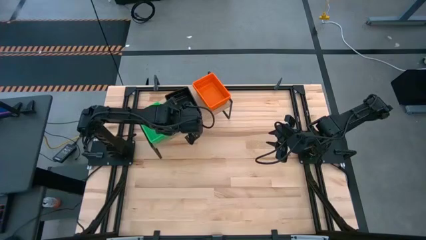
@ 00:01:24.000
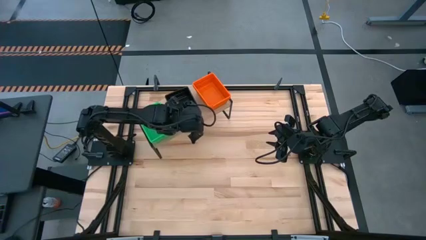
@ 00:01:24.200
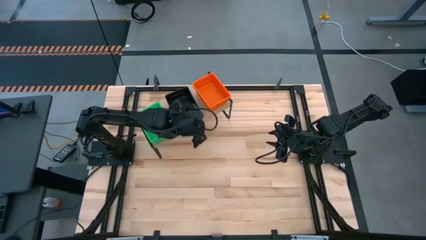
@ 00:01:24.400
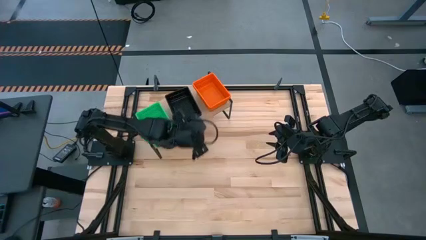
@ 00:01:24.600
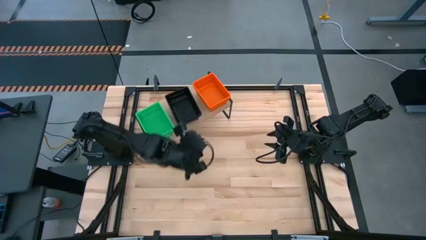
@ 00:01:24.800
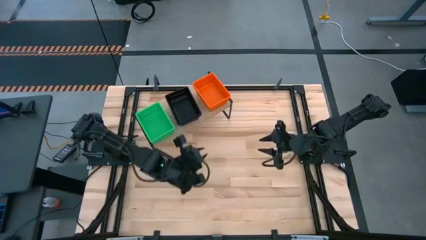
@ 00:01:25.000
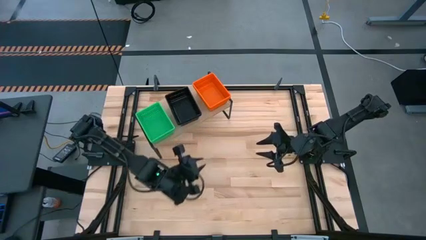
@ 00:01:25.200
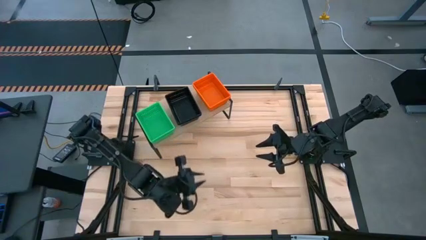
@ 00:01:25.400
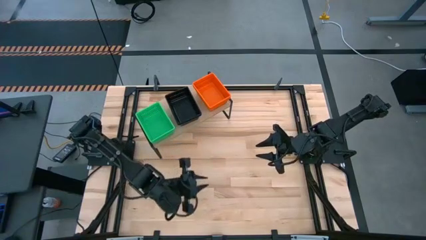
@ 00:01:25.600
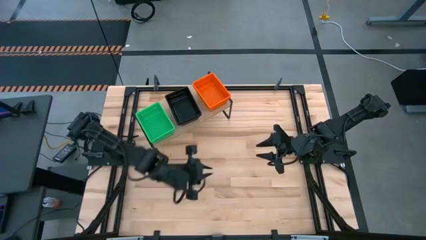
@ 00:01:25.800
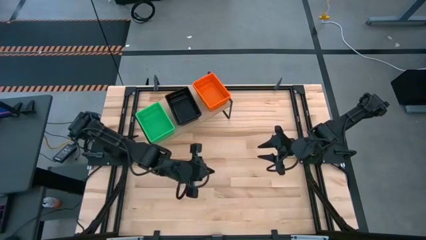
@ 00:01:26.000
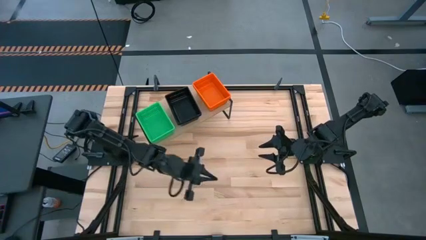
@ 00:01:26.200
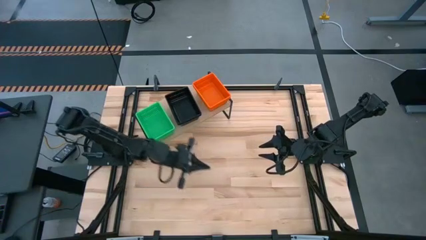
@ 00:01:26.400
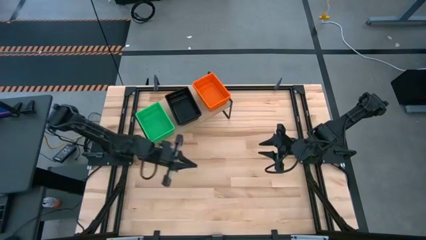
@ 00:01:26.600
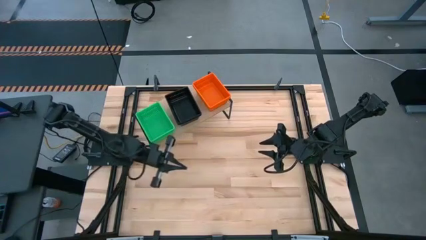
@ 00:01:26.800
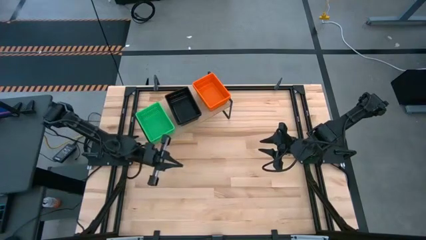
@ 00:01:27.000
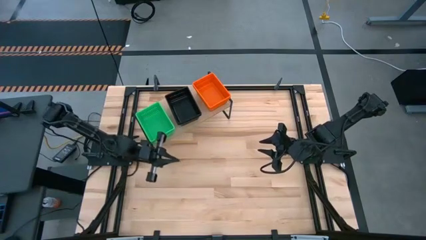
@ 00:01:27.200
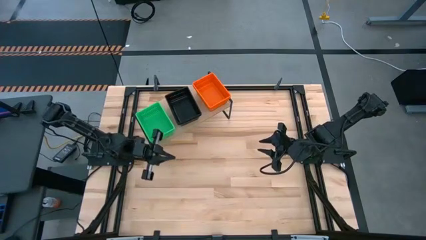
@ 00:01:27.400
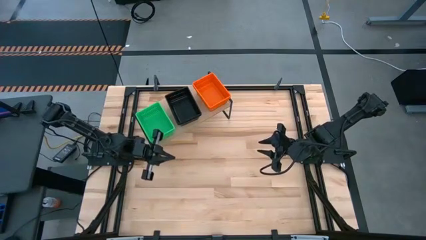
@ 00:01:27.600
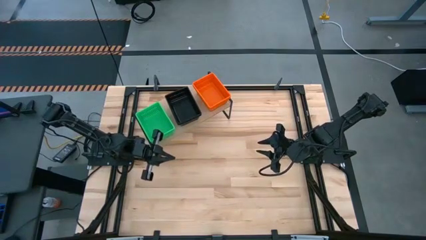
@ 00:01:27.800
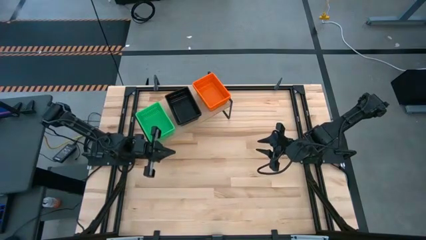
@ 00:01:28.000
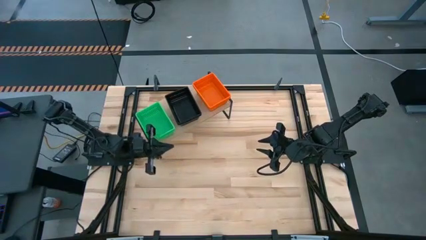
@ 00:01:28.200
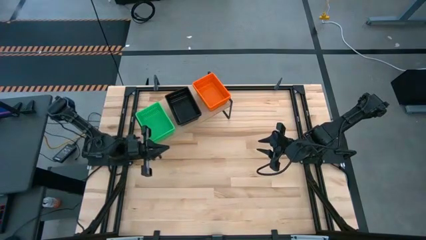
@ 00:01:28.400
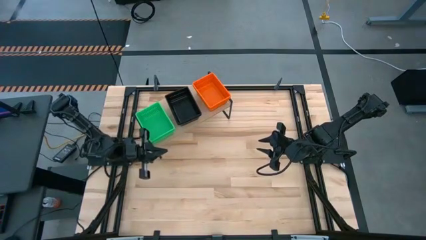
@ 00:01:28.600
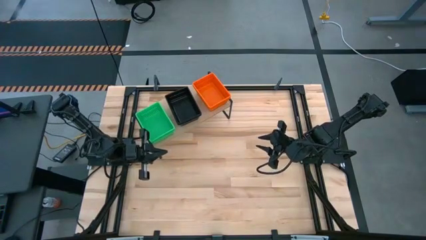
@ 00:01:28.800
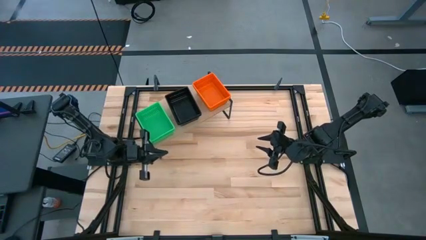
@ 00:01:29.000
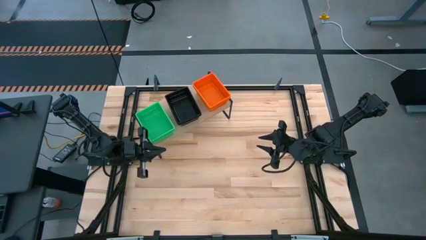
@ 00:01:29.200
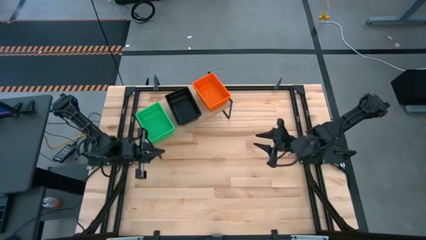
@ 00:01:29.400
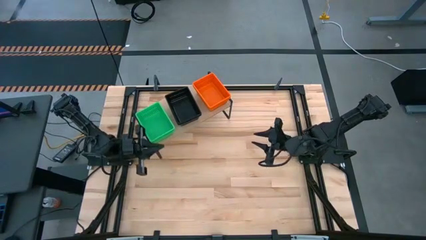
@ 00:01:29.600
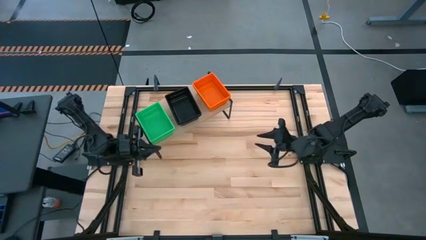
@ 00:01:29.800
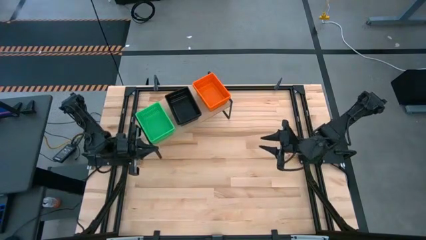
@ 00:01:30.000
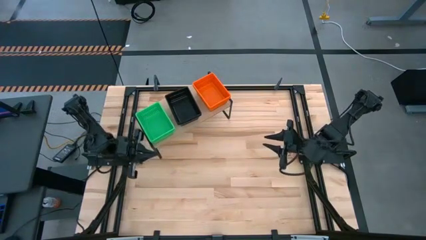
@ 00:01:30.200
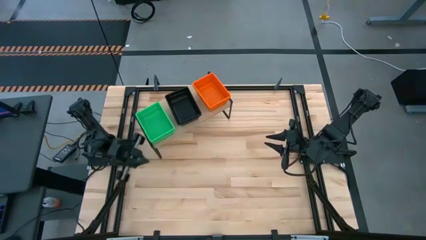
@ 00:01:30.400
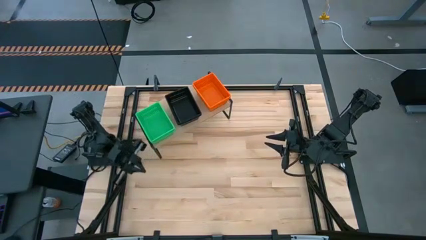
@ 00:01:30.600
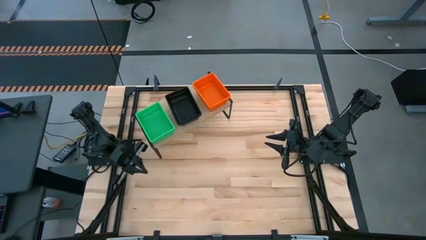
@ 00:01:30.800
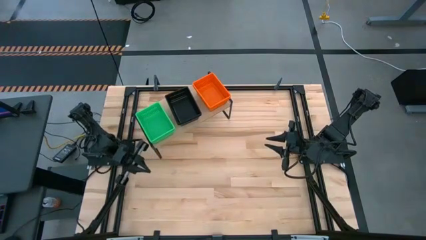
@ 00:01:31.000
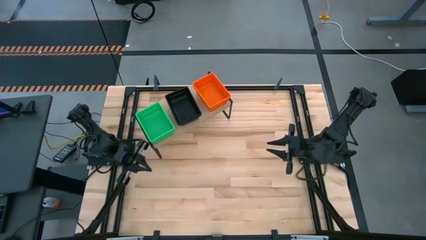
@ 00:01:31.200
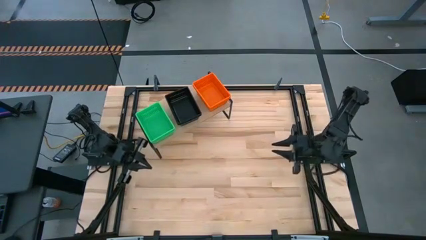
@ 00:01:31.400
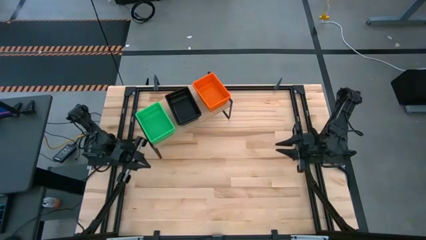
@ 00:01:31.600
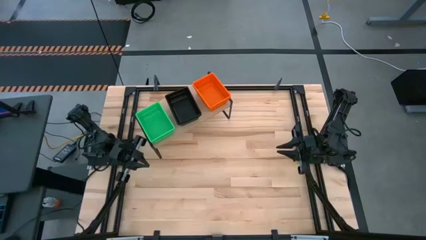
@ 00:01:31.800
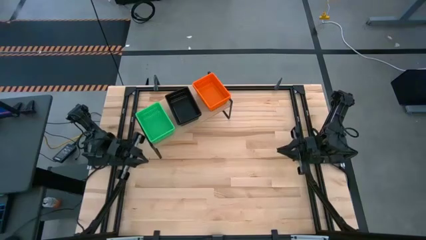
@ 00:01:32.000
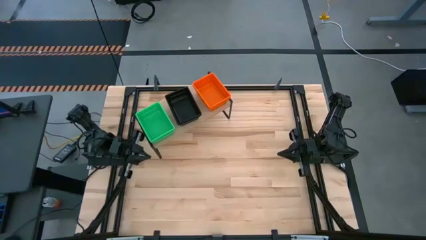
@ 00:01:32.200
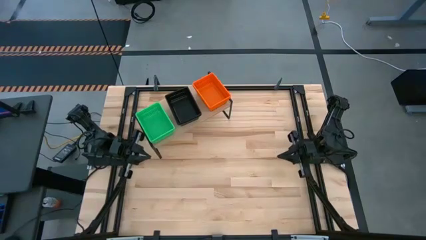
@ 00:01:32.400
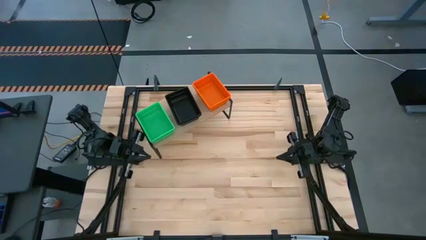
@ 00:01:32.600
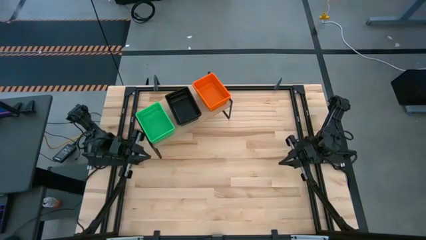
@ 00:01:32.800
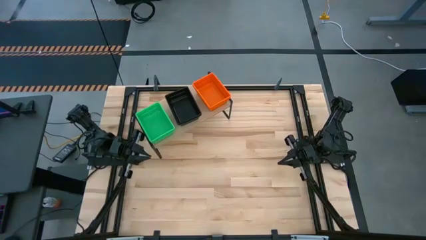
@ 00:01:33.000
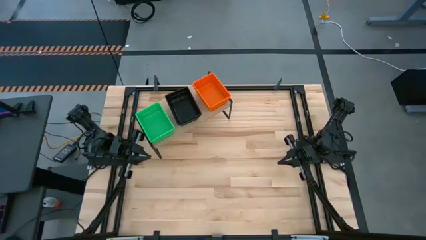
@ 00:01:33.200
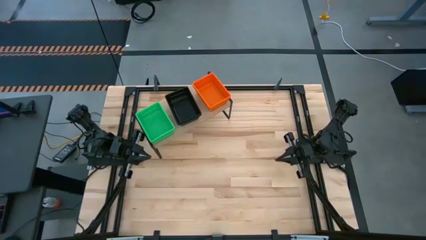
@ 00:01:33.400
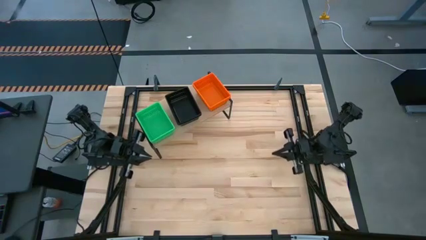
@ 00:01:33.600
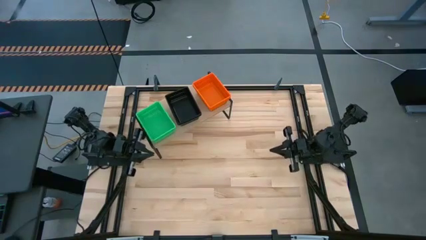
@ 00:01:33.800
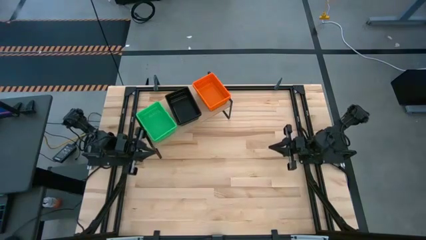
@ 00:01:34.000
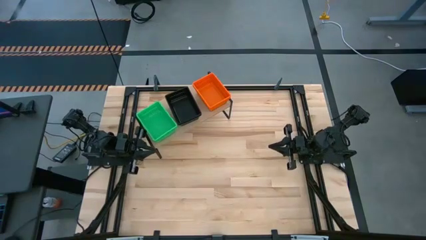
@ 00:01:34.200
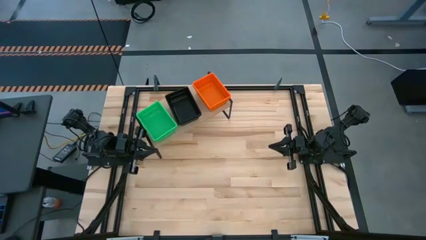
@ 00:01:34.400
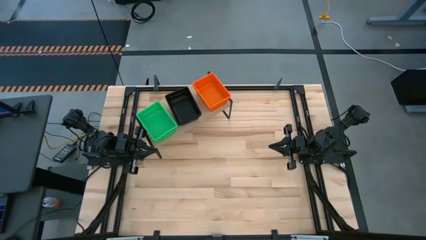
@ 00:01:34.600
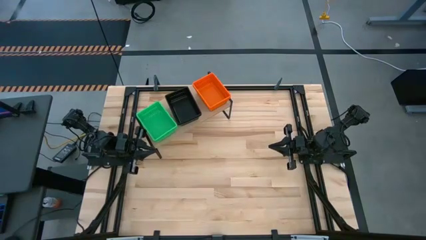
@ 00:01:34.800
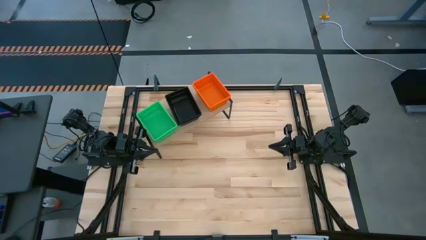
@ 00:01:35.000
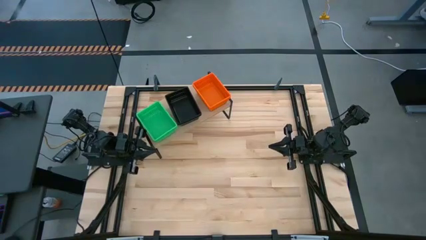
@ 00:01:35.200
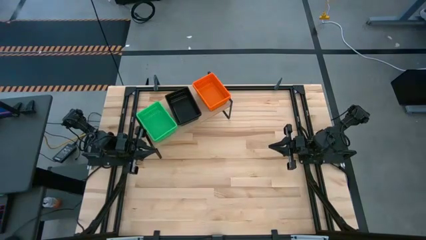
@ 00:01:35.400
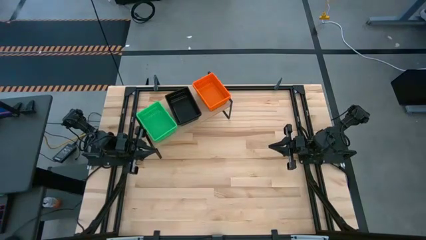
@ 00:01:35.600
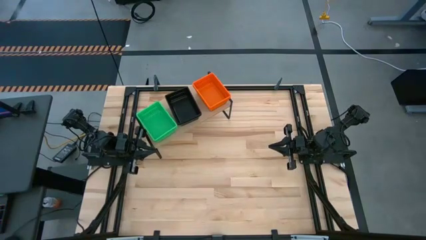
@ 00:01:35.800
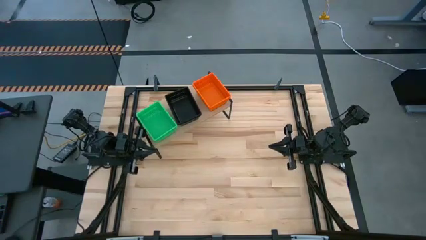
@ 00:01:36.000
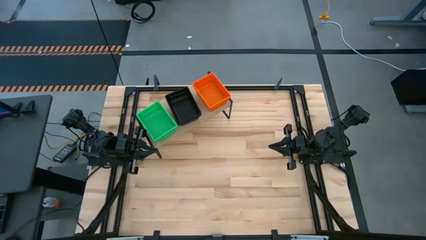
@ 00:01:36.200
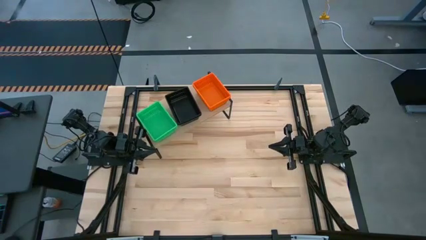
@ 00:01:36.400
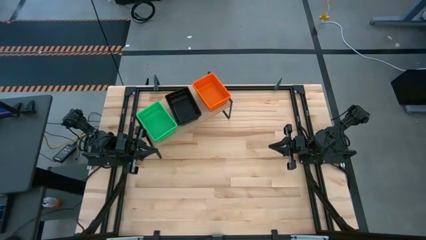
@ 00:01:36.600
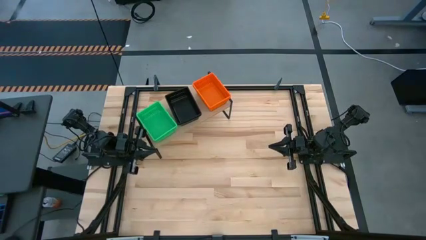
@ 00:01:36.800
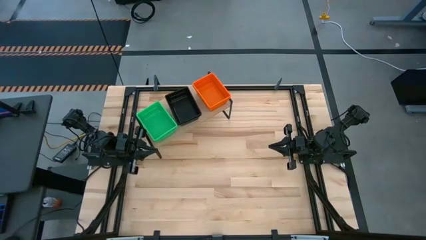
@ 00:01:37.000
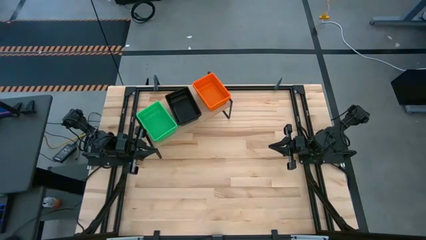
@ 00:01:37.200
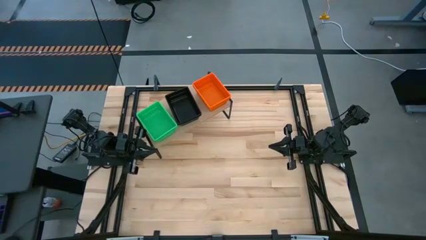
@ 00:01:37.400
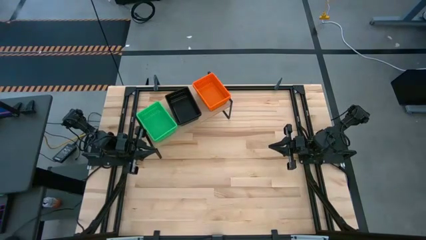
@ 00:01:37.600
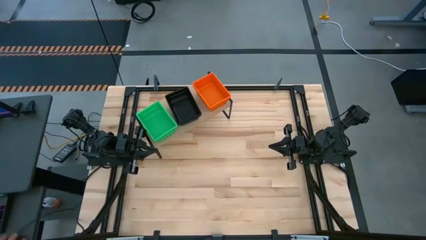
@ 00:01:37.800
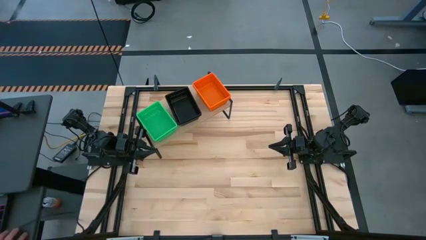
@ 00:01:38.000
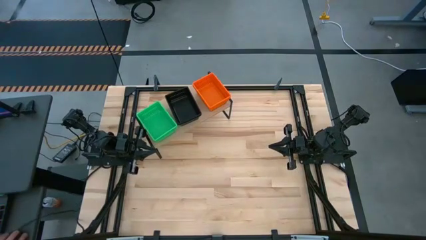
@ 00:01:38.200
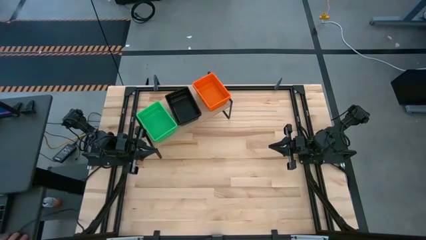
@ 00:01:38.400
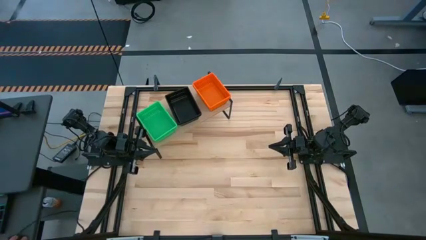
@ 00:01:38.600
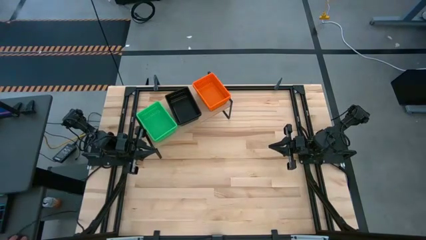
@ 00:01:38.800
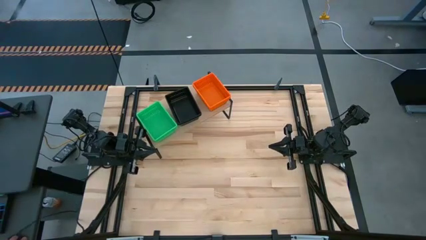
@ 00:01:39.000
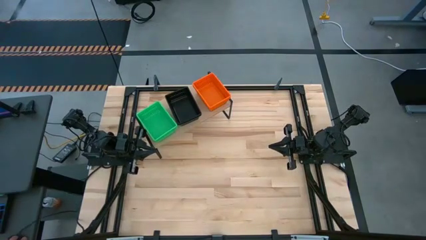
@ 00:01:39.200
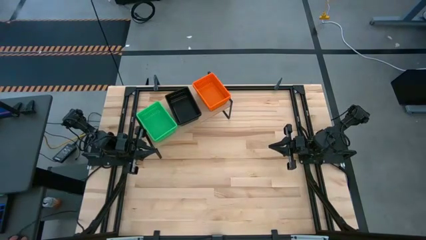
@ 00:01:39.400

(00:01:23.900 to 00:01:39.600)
Task: Stack baskets on shelf by color
Return to Home Position
